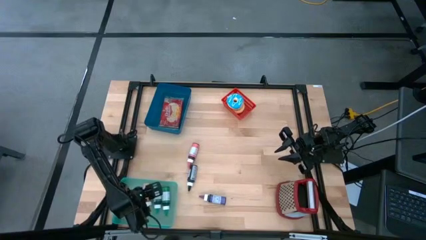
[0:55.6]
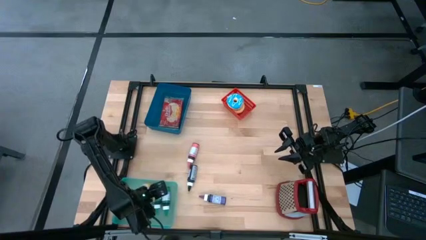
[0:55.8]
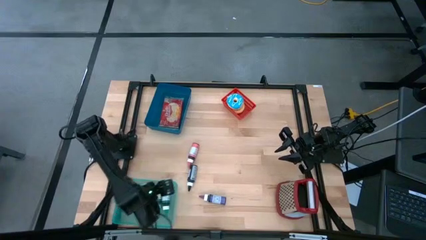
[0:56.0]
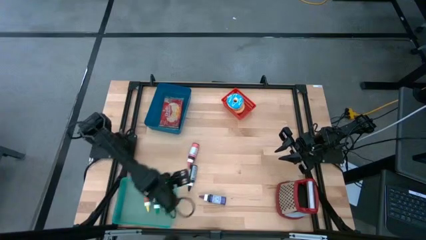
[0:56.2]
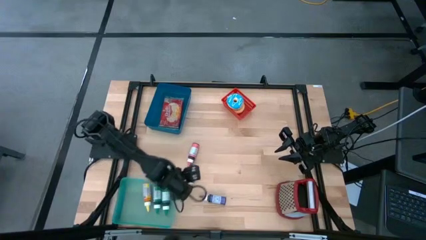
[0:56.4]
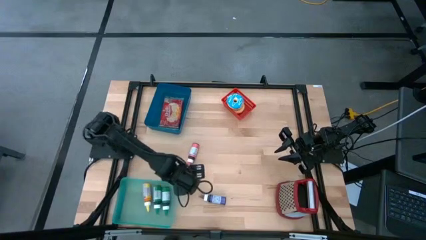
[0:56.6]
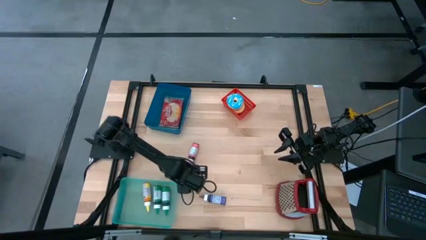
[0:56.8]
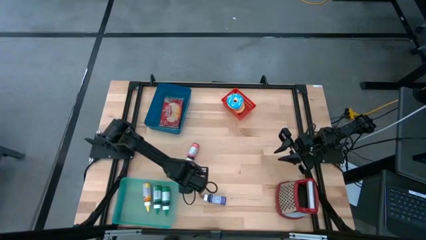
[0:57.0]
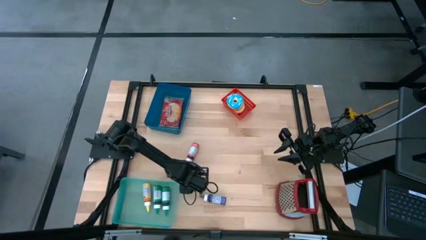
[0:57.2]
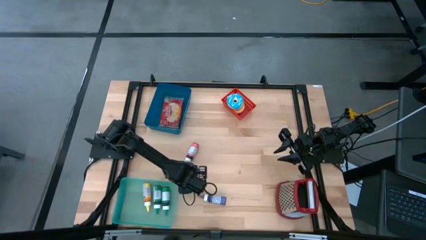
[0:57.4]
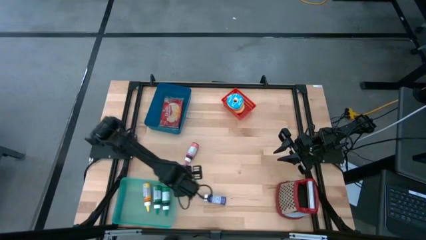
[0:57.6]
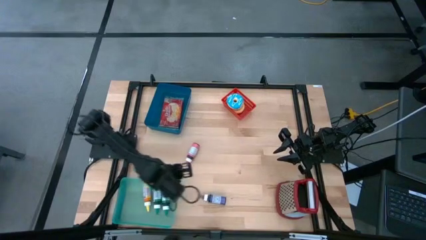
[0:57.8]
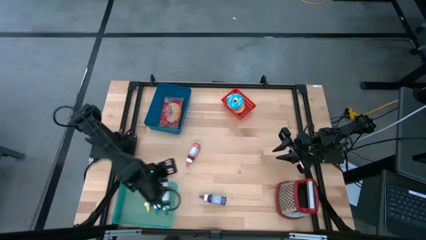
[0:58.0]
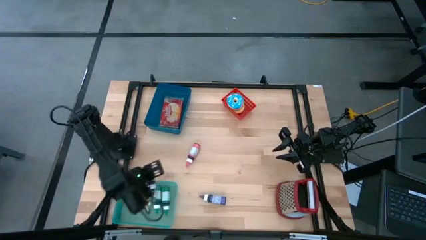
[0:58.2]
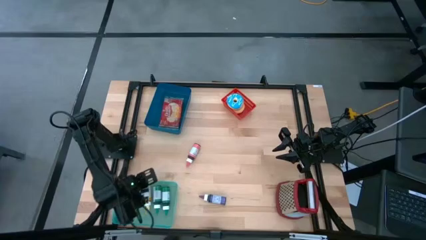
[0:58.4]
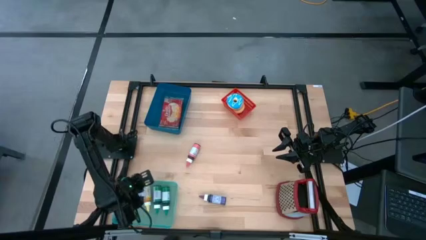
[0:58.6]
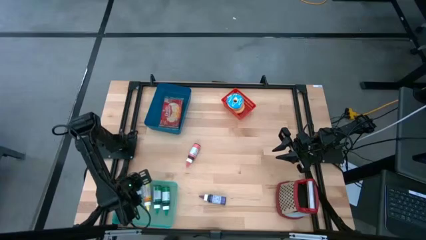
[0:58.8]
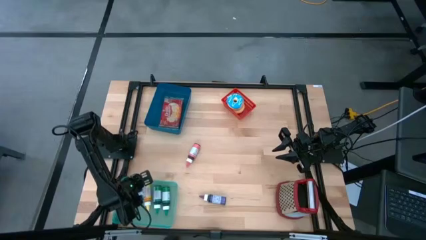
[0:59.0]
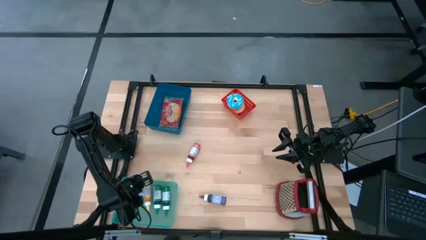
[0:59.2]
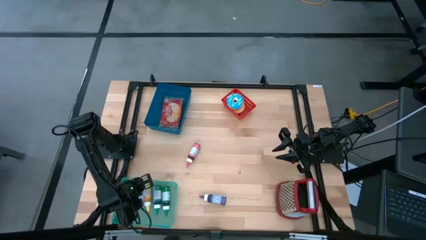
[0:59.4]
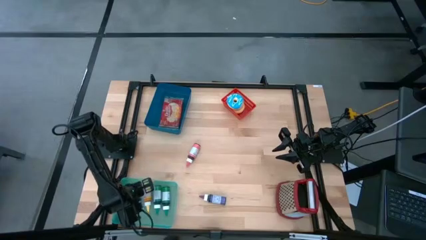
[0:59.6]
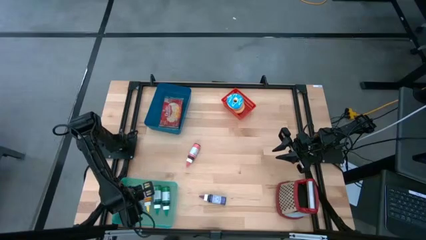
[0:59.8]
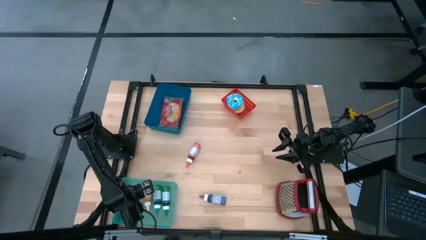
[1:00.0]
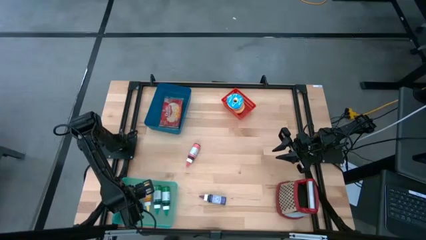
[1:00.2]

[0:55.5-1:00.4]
Put the black food coloring bottle into the green bin

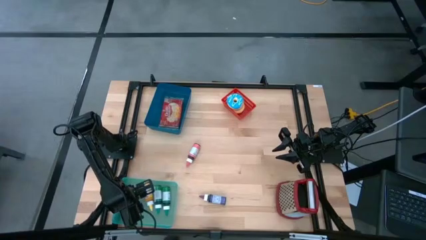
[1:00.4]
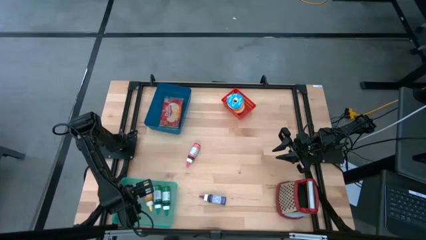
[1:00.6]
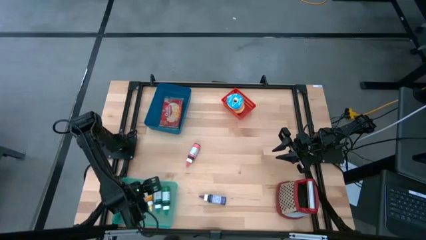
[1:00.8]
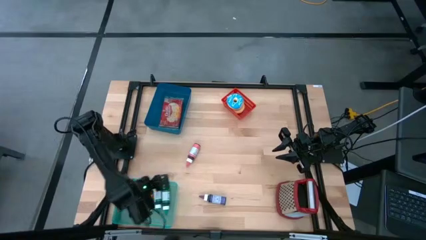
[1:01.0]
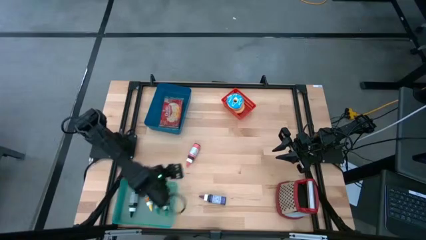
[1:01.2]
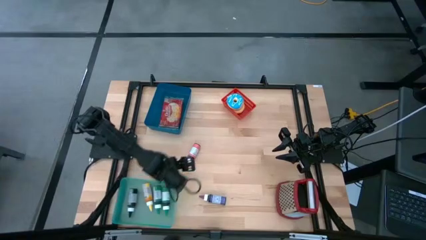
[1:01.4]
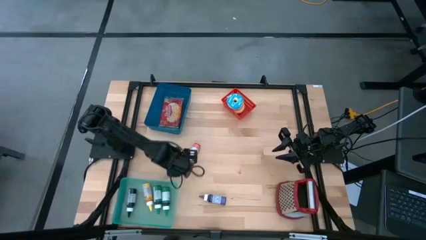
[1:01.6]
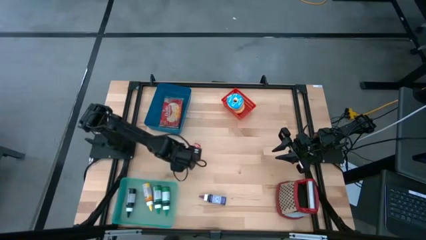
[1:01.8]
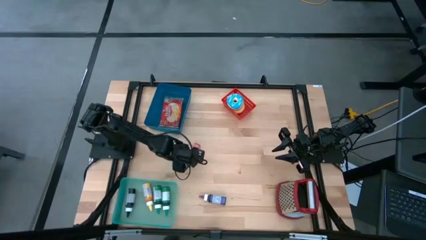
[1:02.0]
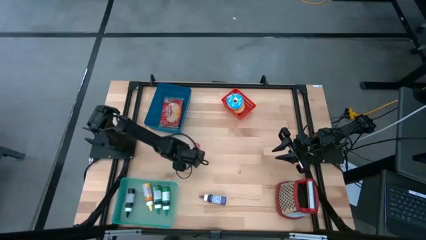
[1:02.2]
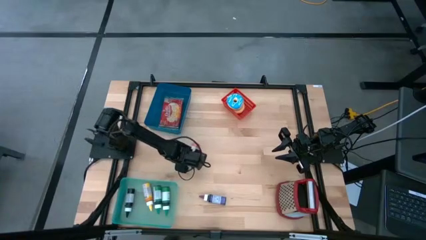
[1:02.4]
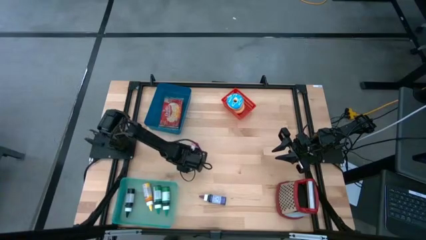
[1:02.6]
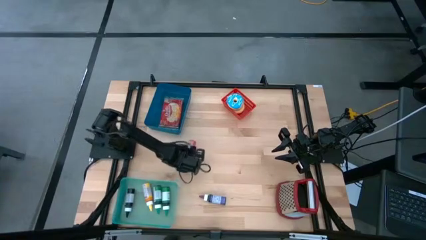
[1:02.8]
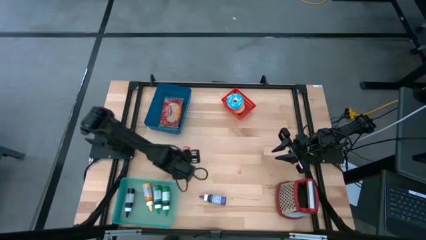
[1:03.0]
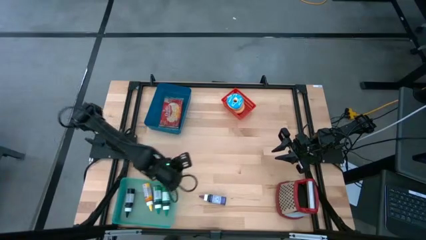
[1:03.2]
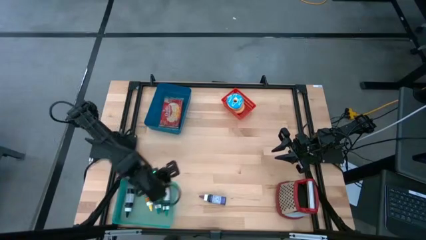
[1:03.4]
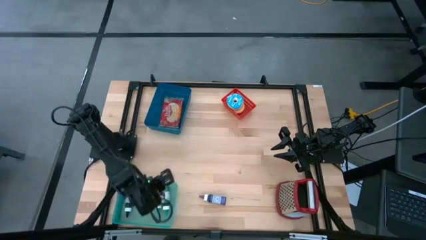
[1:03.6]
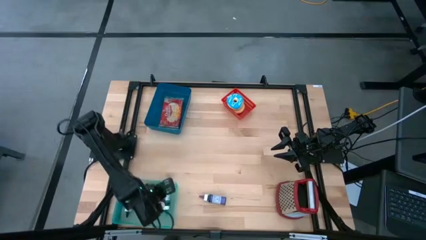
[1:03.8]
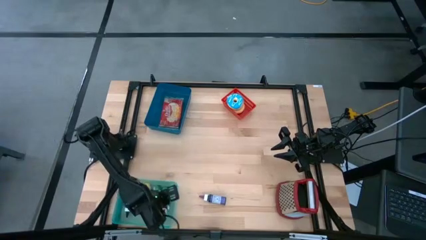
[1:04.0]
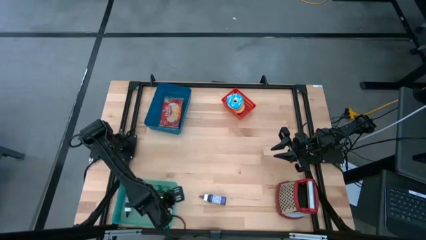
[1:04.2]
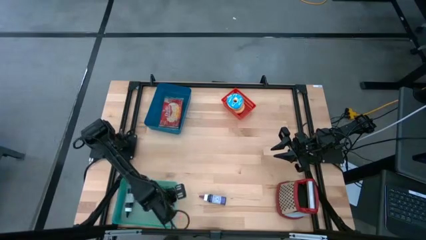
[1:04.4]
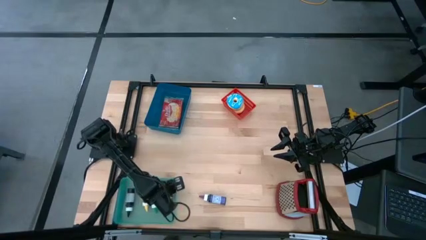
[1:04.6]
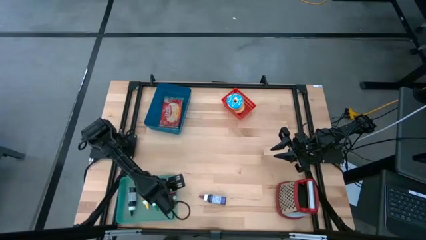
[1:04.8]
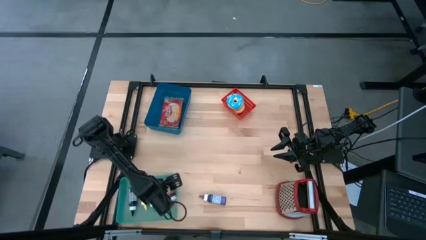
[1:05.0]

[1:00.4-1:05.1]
Put the pink food coloring bottle into the green bin

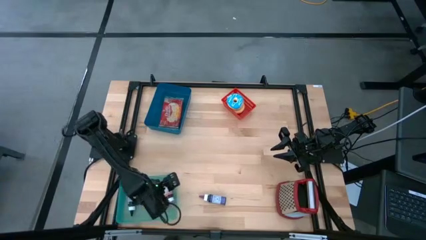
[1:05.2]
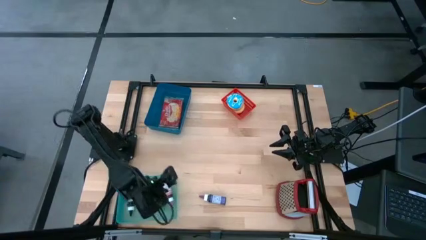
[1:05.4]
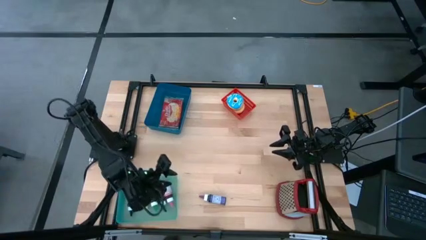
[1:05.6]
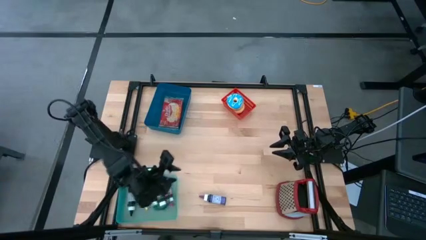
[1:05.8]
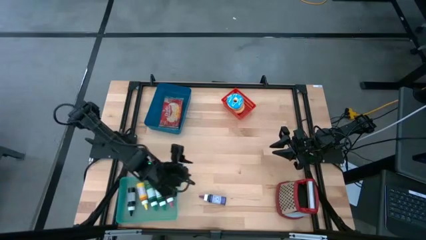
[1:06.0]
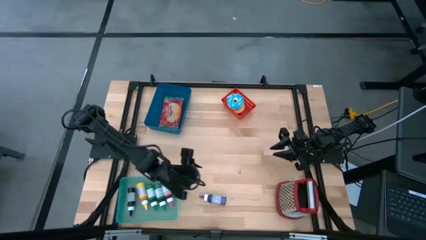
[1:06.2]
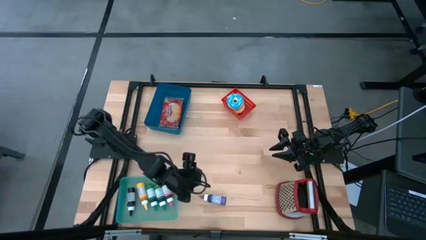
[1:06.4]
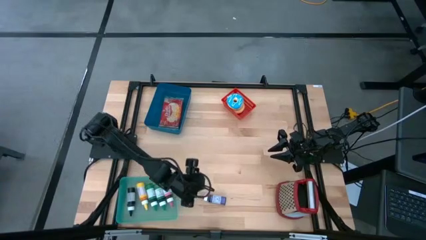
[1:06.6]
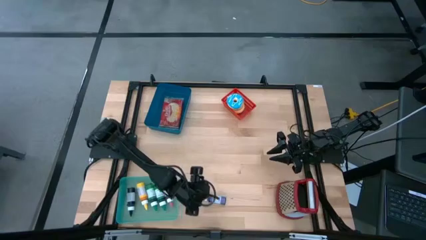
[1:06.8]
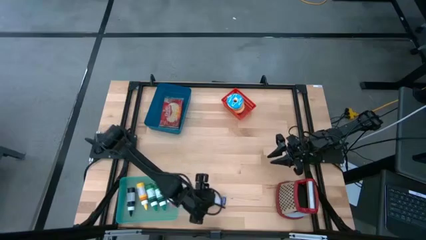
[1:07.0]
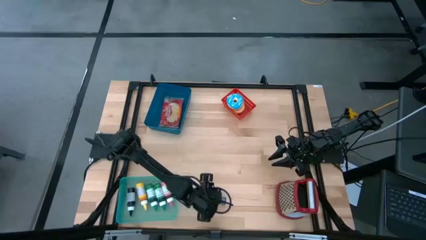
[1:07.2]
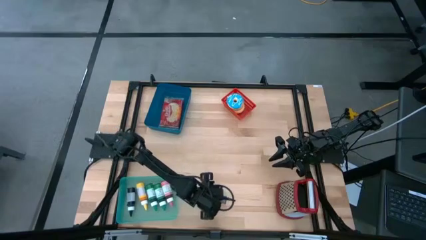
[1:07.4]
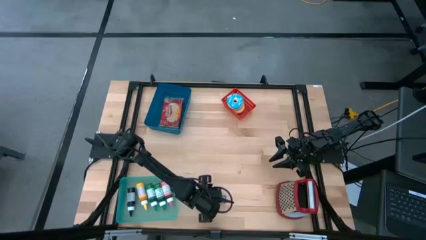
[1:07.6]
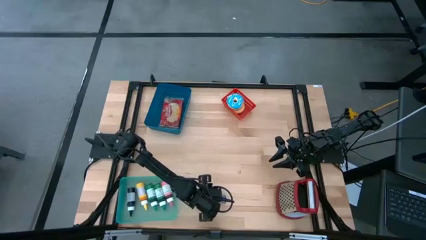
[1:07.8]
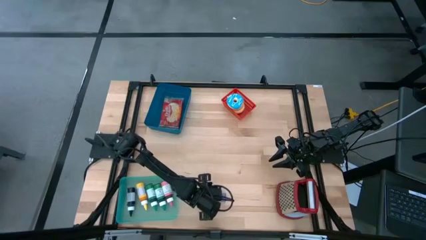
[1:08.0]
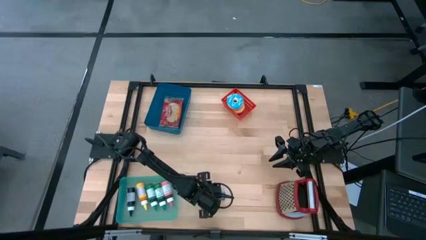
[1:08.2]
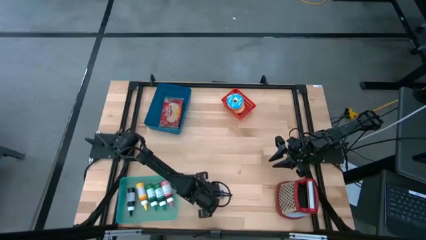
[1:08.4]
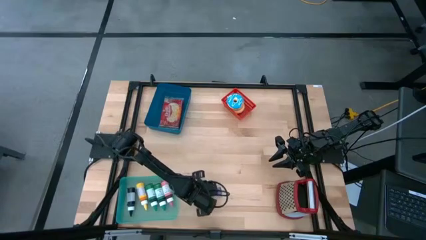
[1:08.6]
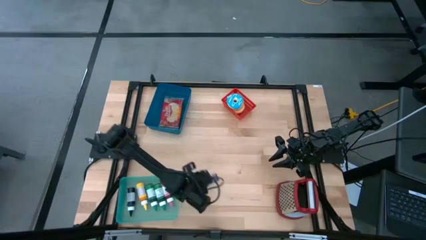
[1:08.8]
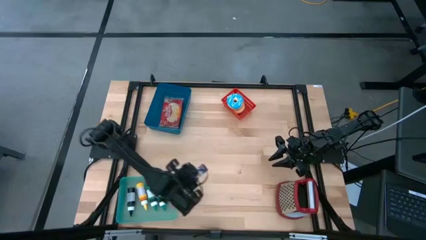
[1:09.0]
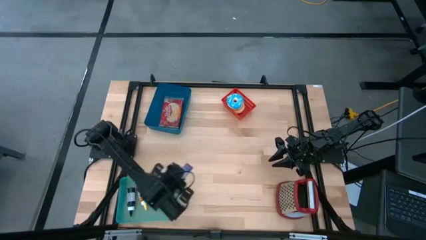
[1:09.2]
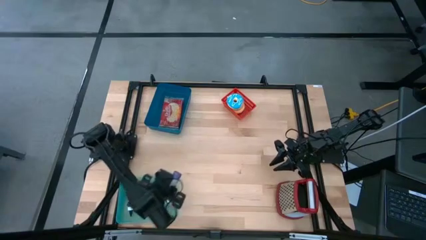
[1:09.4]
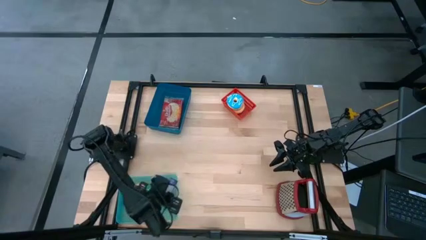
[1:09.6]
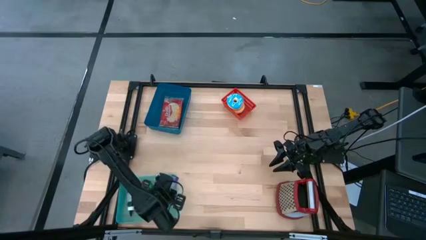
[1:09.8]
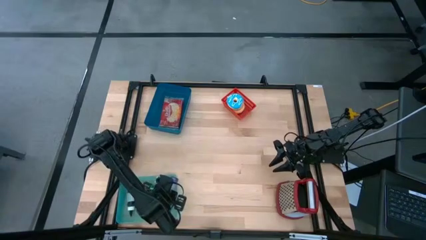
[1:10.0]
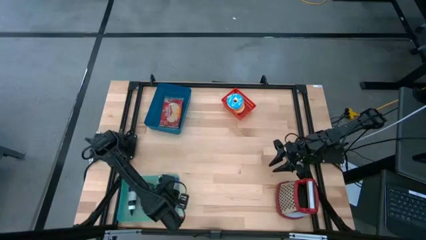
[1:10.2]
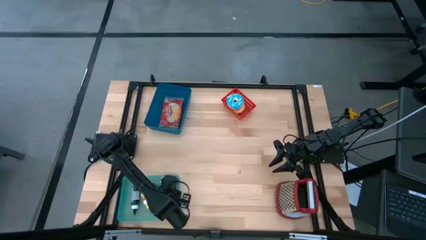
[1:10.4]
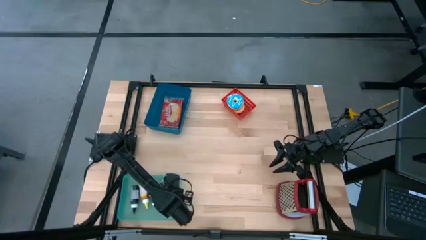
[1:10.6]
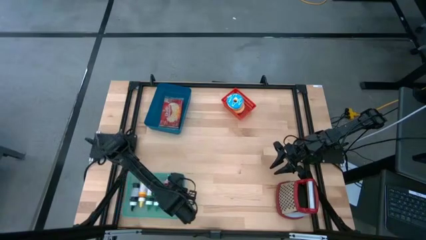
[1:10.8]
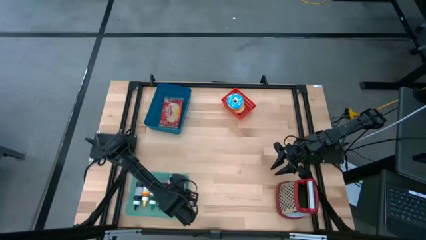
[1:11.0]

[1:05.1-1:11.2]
Put the violet food coloring bottle into the green bin
